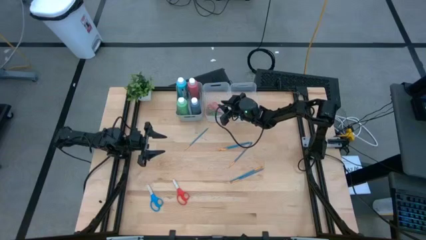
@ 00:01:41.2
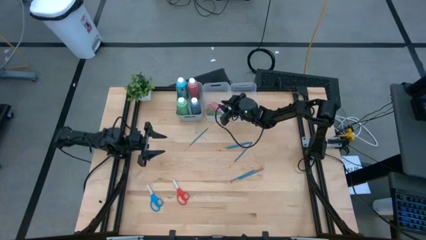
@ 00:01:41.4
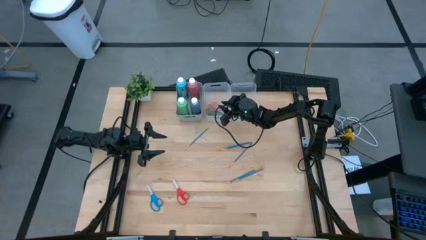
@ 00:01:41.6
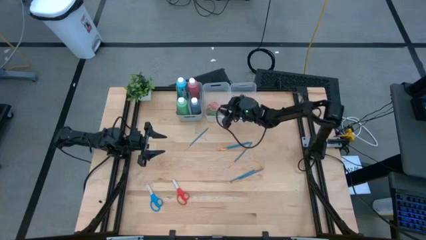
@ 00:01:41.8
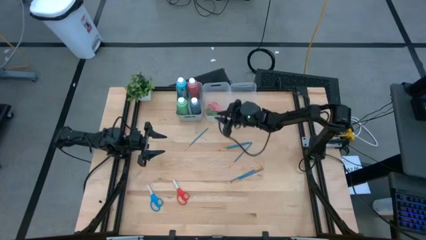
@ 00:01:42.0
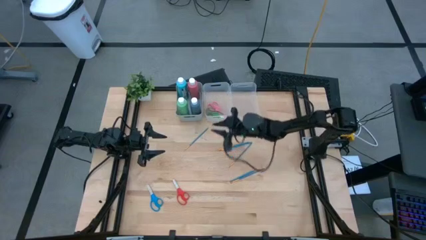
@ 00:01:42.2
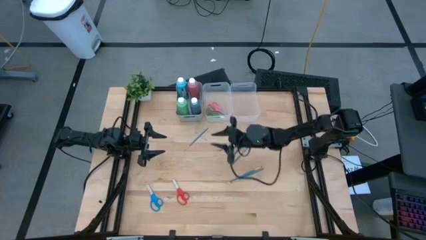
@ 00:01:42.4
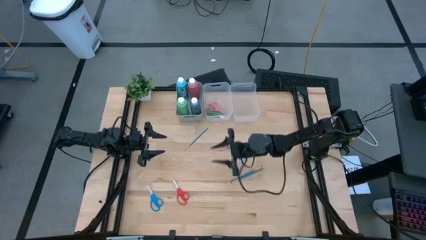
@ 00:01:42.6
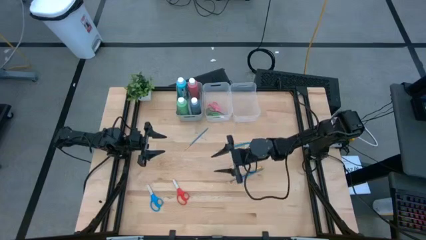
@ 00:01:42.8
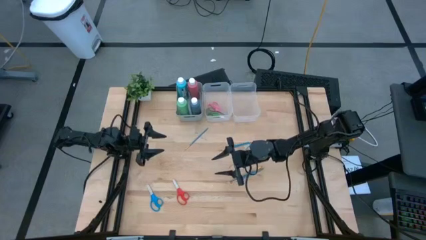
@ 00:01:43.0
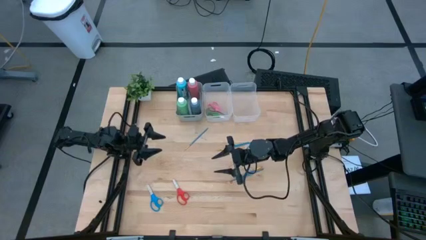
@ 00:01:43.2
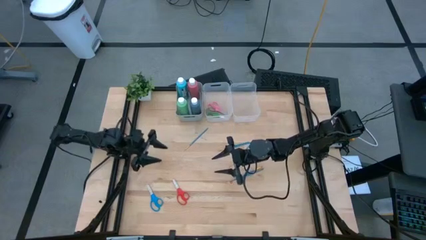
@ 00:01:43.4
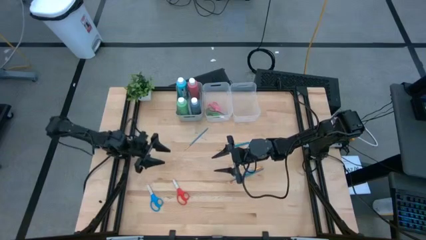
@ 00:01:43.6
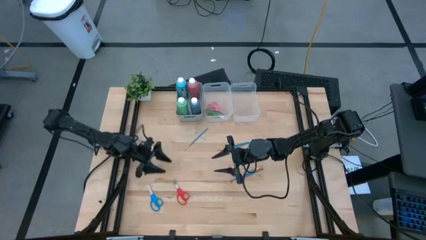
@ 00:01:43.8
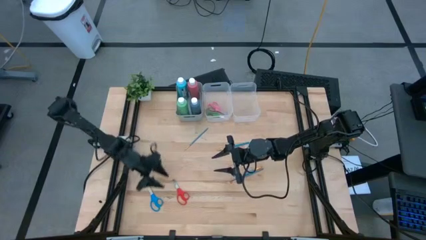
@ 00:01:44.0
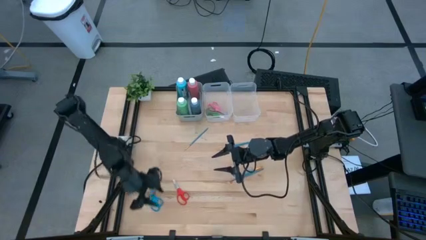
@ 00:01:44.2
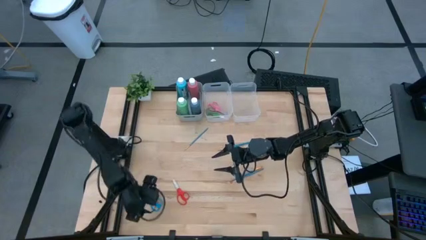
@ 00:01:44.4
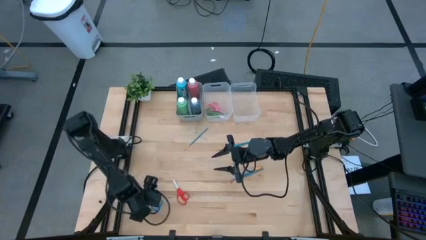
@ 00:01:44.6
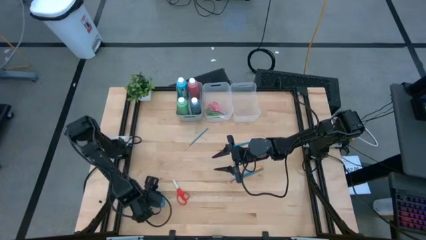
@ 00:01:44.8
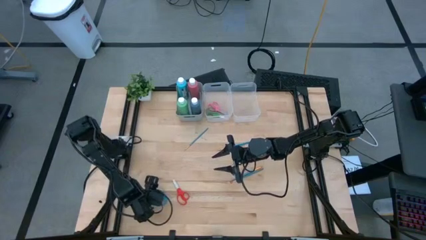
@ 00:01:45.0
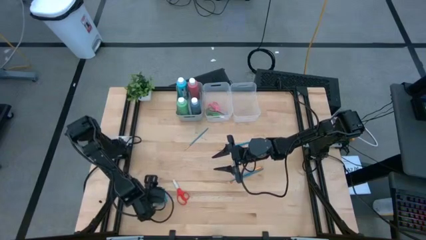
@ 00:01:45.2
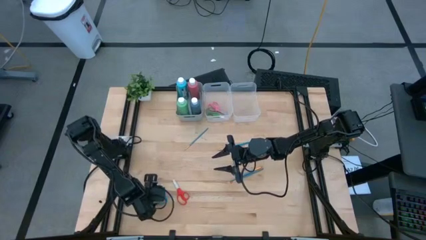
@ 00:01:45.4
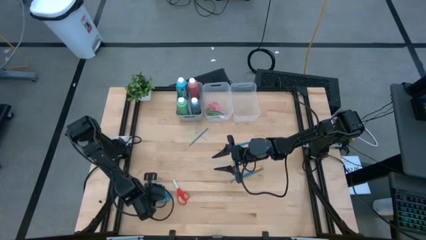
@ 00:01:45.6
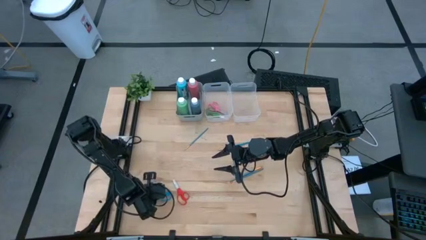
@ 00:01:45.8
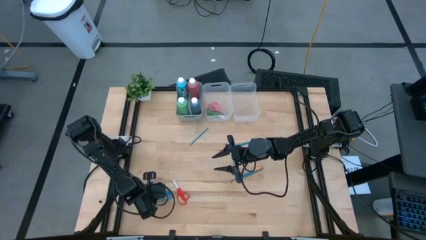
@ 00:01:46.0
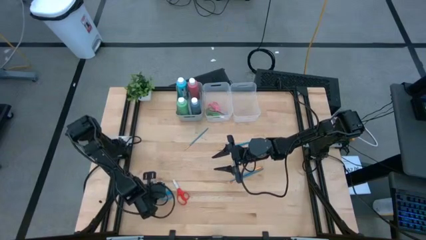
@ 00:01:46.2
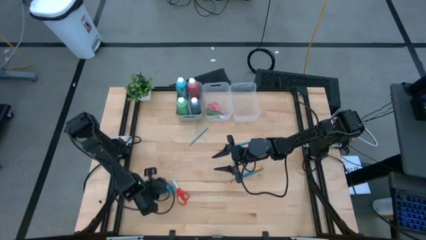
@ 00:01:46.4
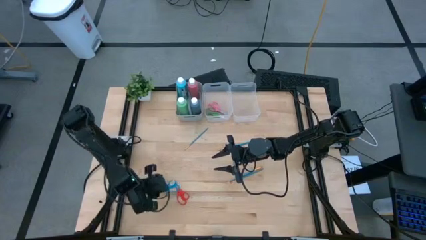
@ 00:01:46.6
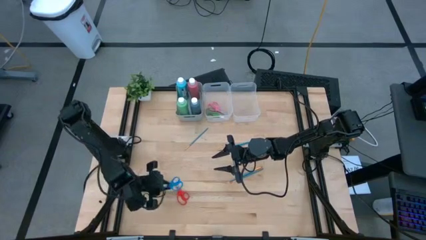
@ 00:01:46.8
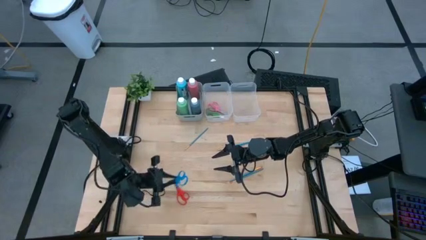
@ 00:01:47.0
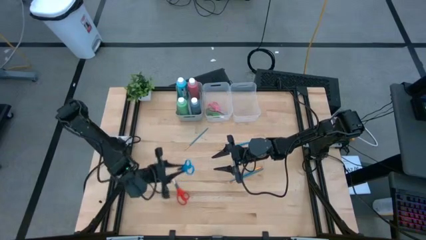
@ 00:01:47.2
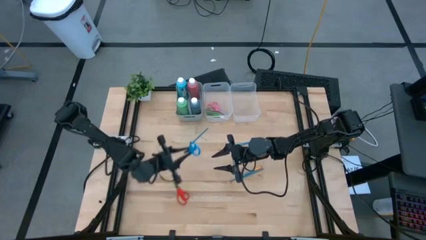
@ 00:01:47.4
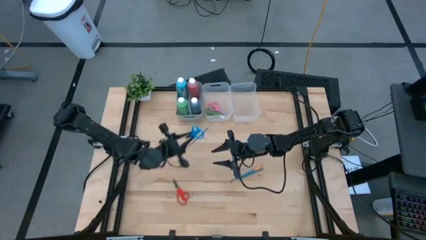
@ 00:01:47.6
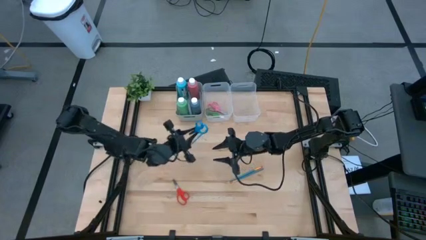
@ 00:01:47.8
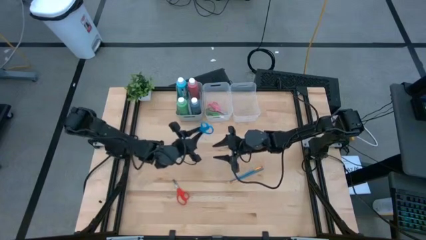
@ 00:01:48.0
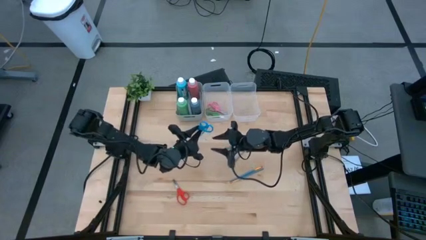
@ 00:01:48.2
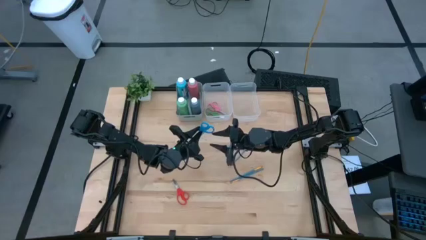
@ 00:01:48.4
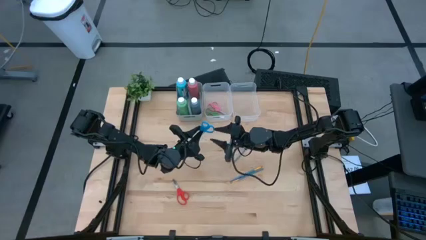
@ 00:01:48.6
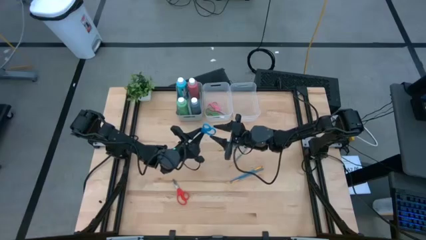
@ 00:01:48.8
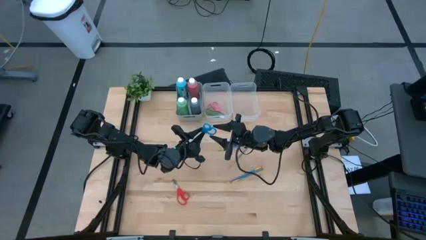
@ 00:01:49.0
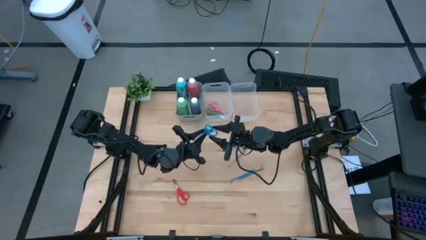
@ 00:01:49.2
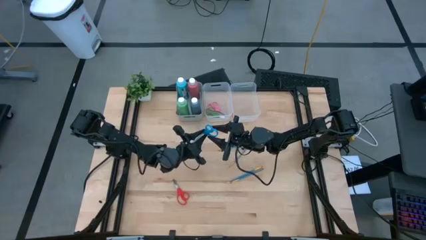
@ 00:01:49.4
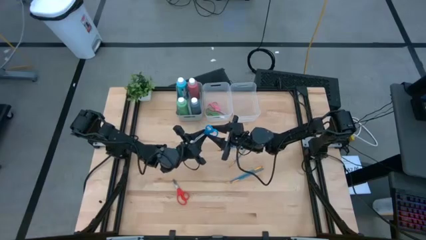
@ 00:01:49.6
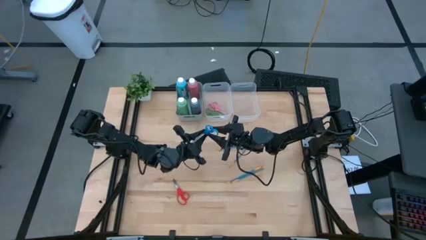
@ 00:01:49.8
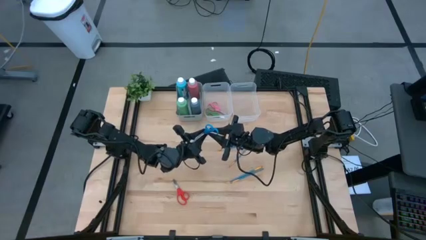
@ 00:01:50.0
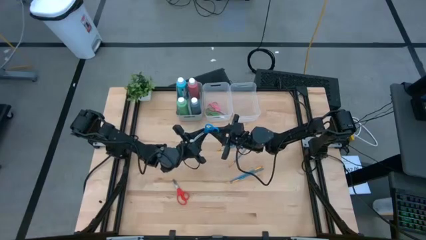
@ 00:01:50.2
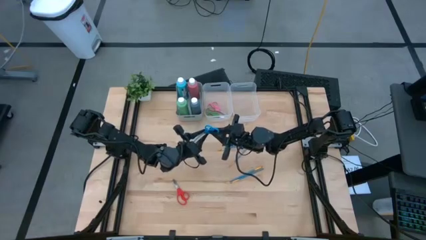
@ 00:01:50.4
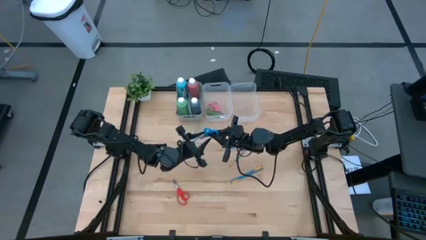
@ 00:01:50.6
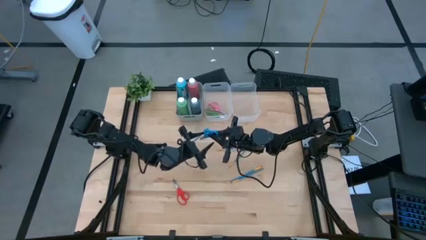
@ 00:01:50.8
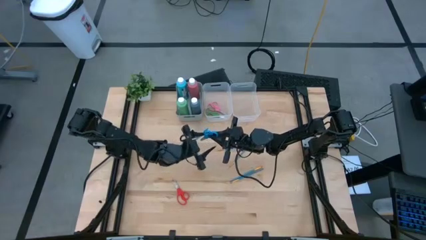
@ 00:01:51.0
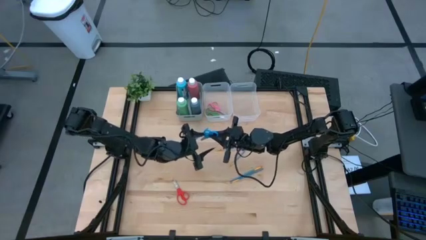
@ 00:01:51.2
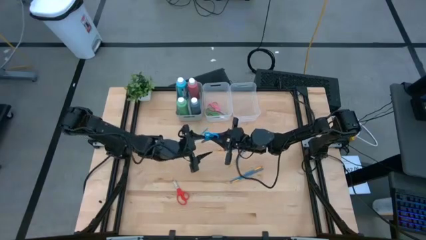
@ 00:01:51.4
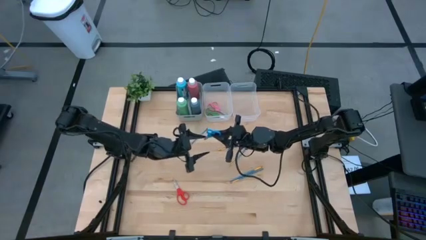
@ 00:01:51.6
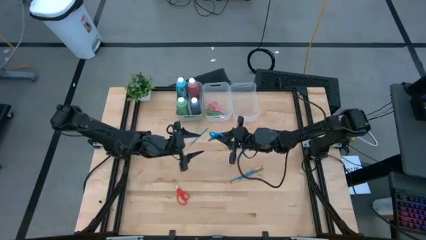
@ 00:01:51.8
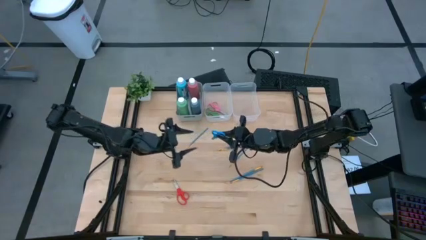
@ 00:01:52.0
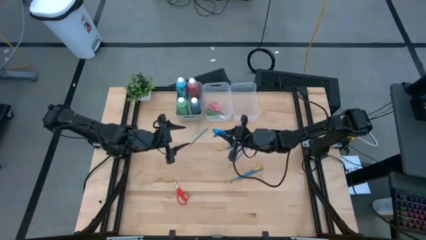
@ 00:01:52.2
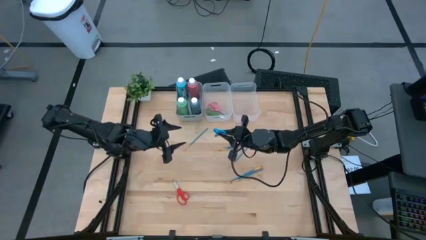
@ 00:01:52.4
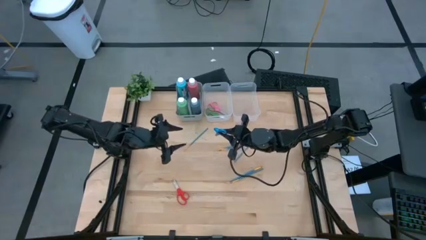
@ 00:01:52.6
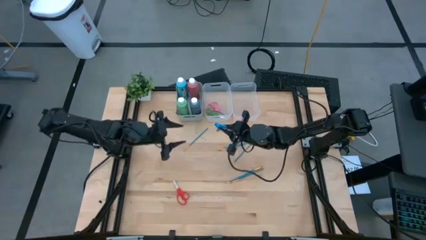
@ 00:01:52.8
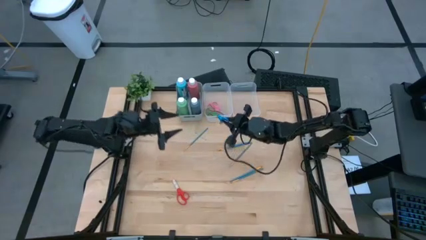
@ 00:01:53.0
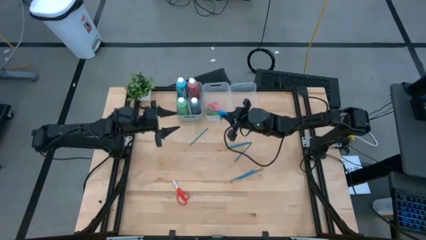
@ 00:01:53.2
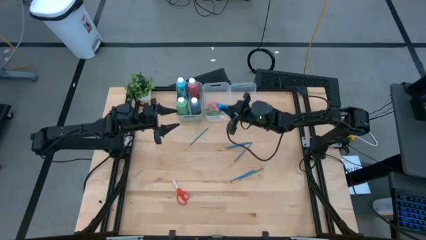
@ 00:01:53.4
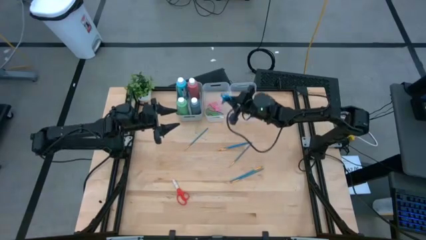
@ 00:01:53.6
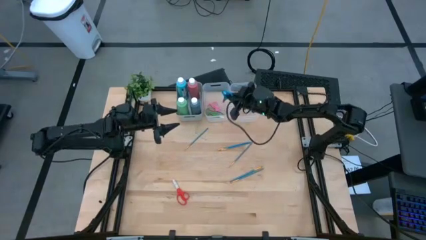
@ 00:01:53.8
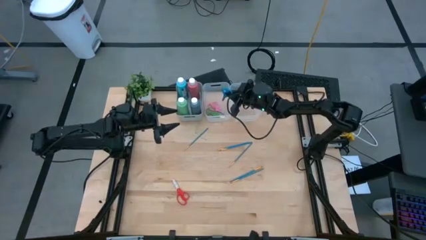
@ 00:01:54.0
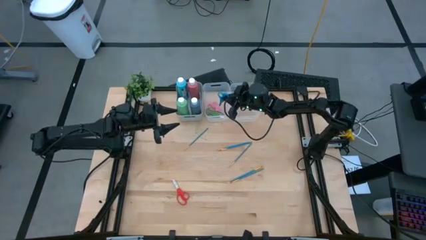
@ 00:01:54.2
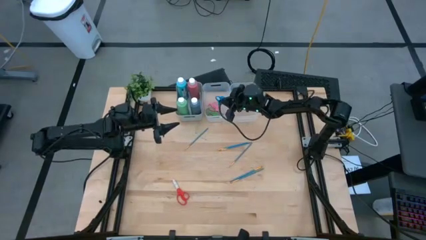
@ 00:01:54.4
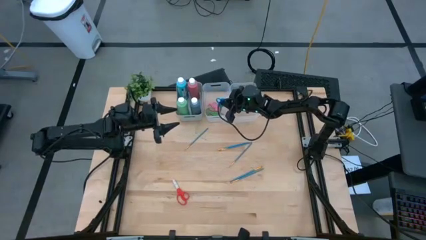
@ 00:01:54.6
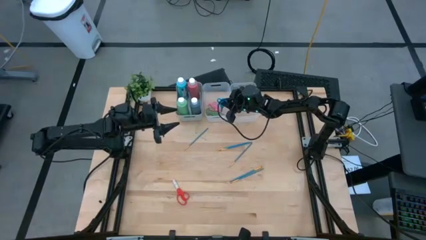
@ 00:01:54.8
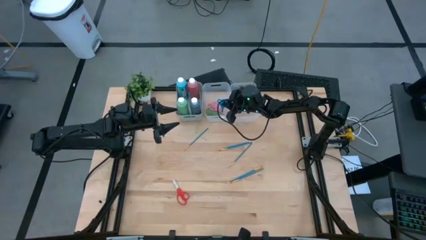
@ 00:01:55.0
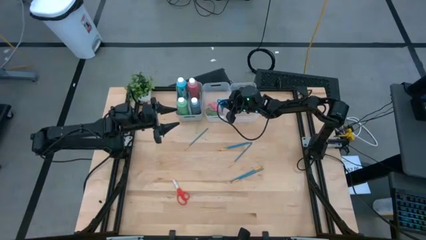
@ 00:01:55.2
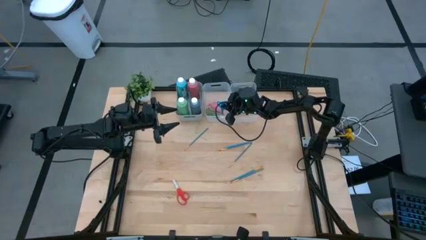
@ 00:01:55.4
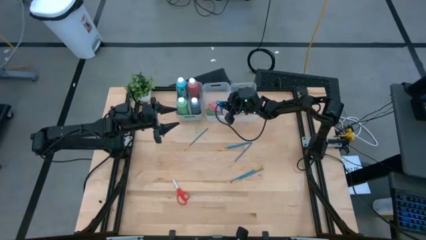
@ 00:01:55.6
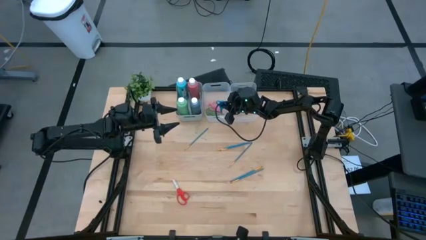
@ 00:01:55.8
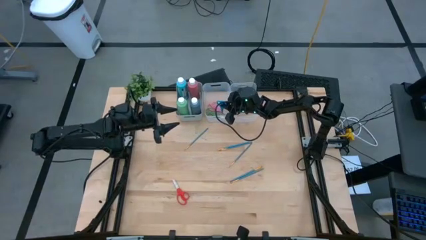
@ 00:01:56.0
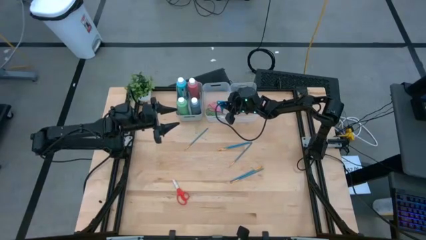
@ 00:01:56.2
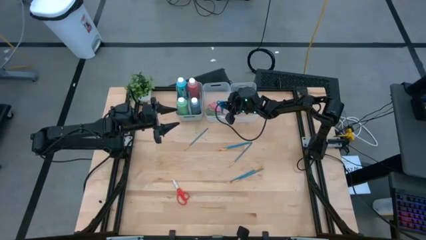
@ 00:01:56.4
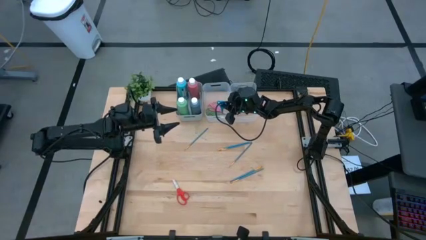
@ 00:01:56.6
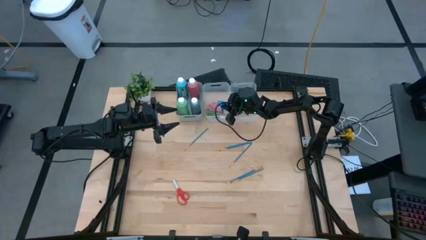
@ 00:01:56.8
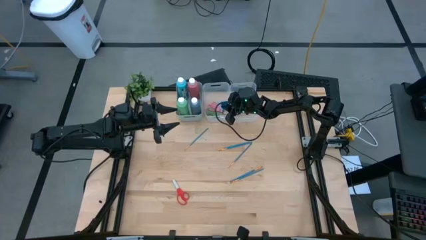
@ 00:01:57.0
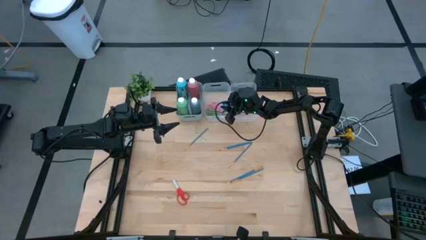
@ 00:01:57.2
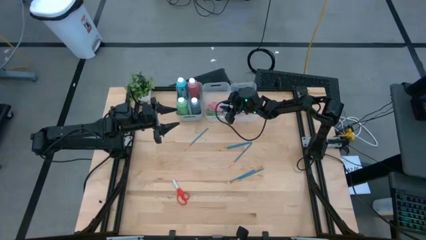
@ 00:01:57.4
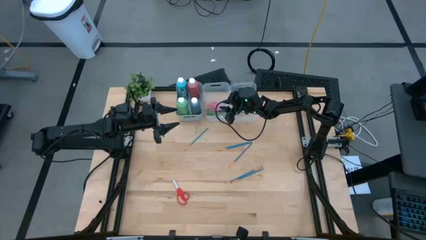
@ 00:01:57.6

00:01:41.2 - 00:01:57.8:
Task: Pick & Place Paint Supplies
Put the blue scissors into the left transparent bin
